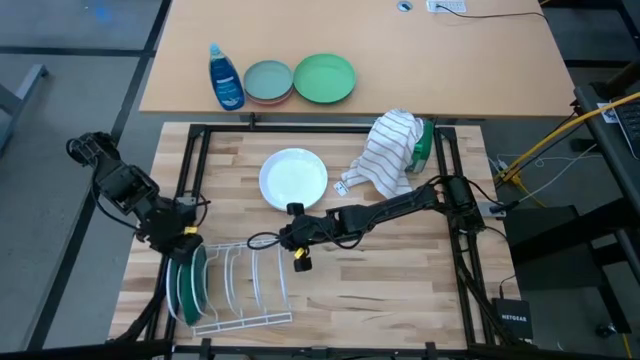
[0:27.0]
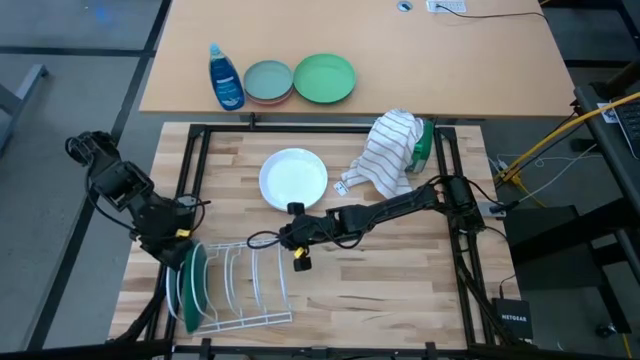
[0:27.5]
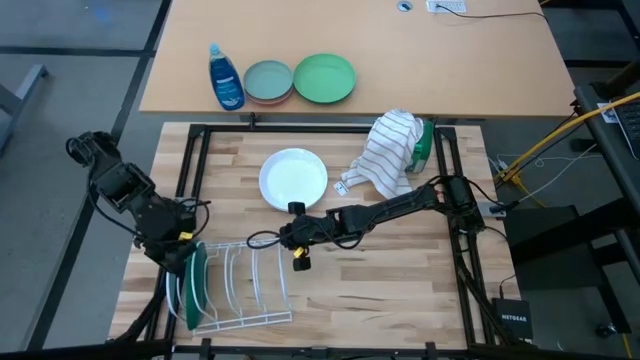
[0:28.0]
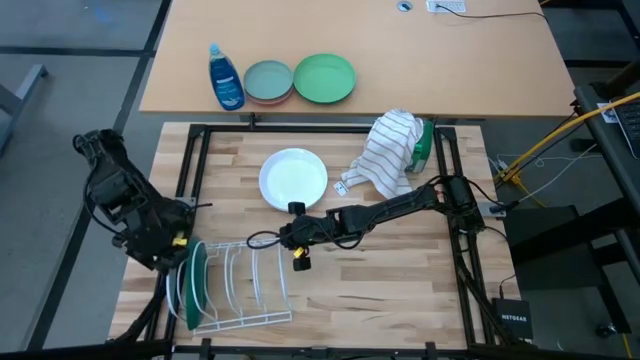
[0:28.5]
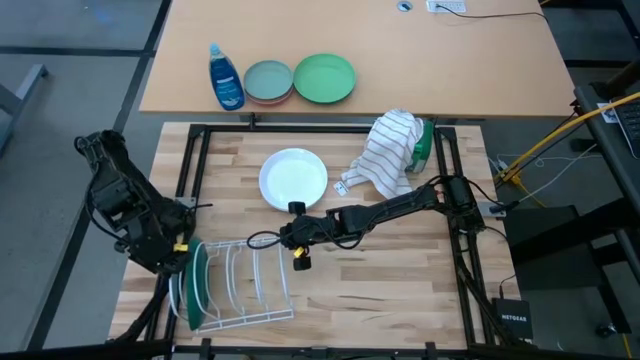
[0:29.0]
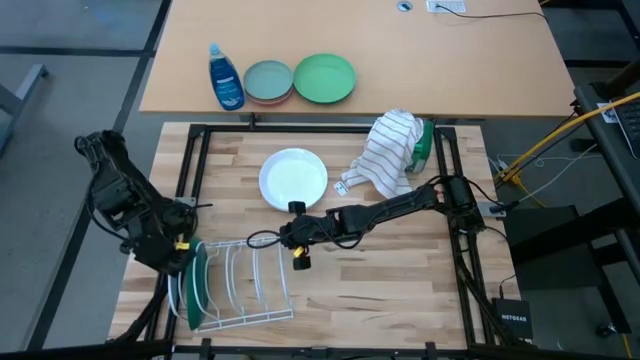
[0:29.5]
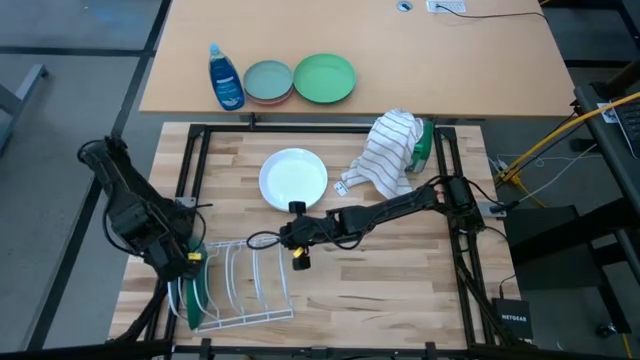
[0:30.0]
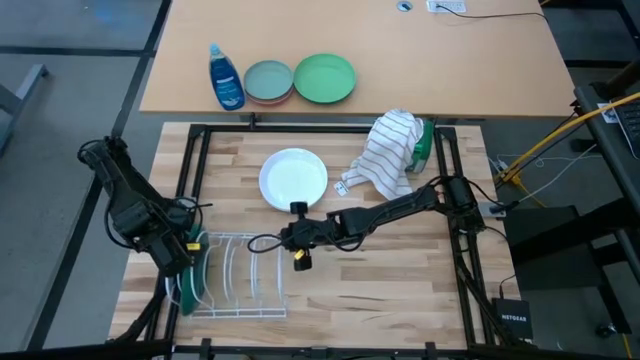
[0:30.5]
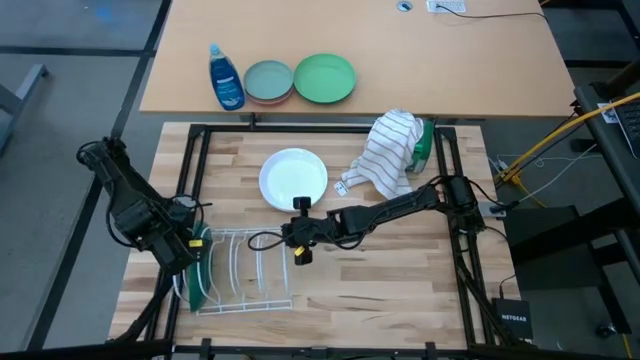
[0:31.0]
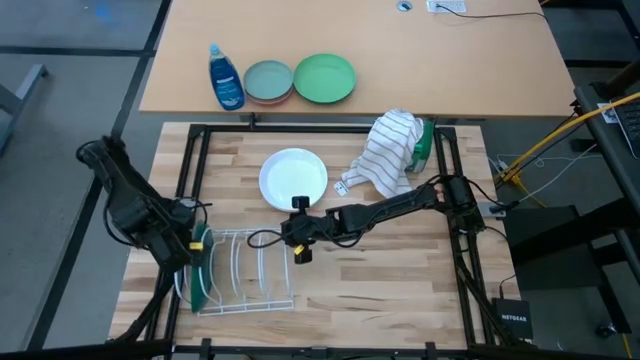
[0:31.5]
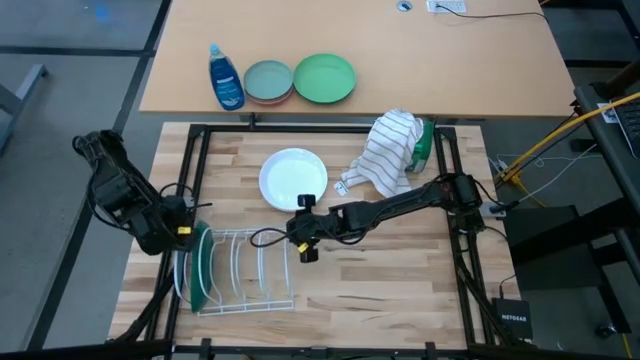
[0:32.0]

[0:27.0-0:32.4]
Task: Sort dishes
Adjust the white dish rack

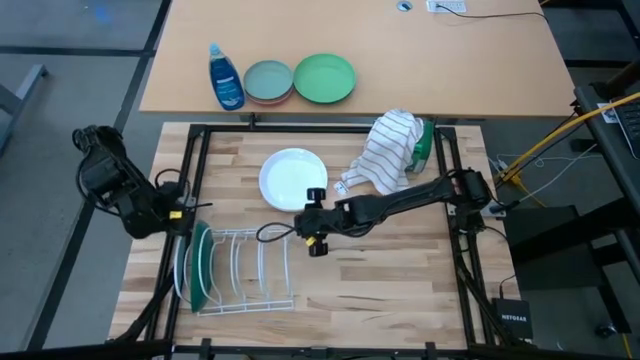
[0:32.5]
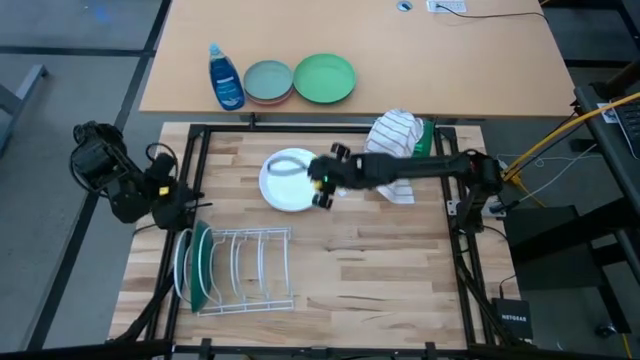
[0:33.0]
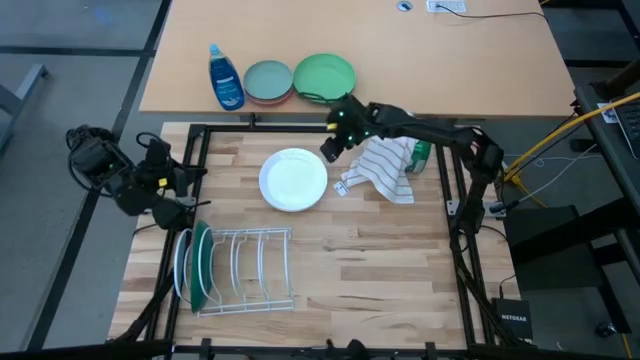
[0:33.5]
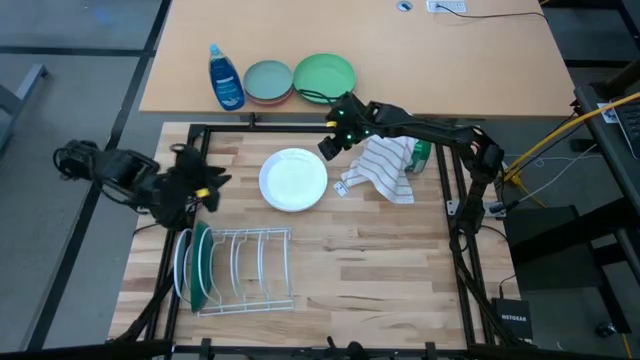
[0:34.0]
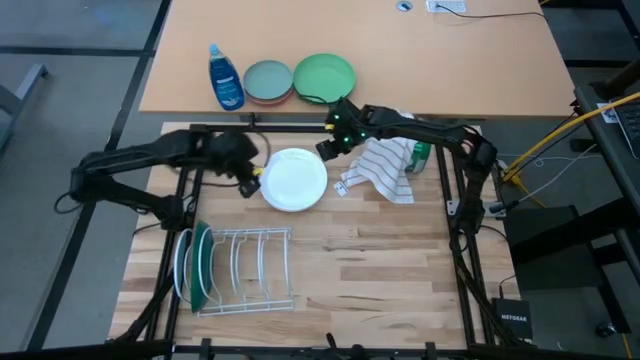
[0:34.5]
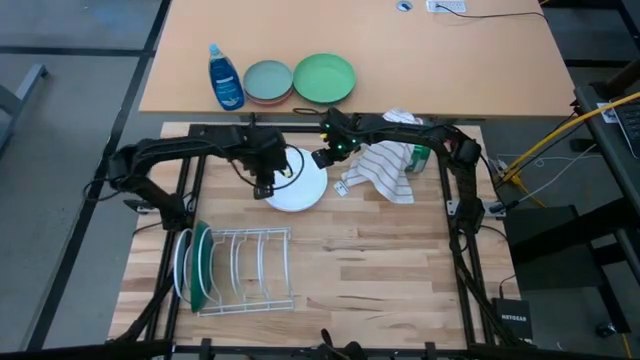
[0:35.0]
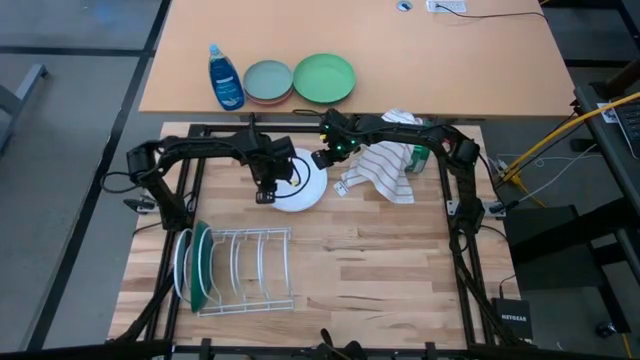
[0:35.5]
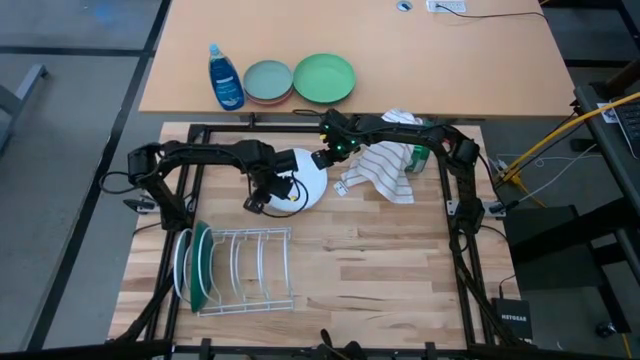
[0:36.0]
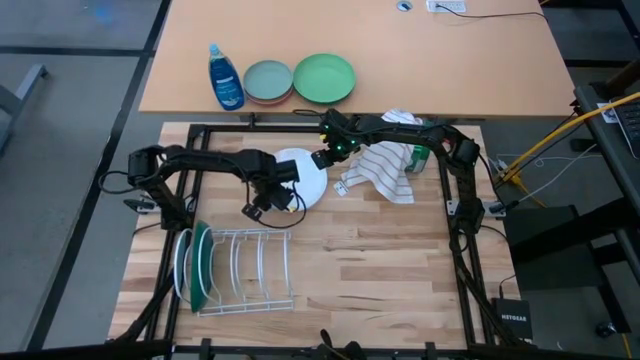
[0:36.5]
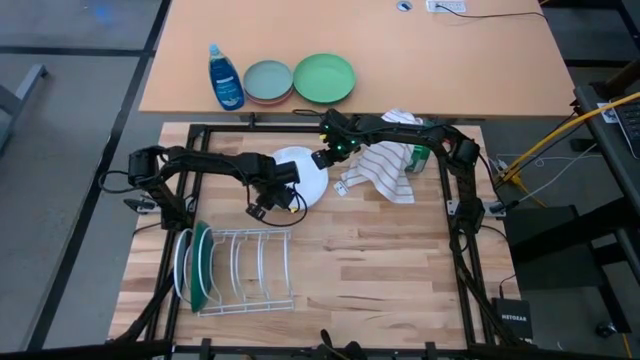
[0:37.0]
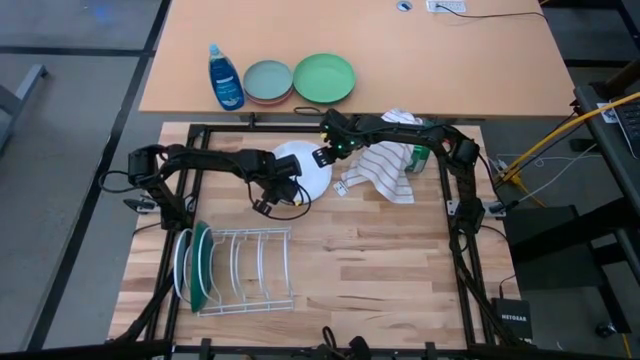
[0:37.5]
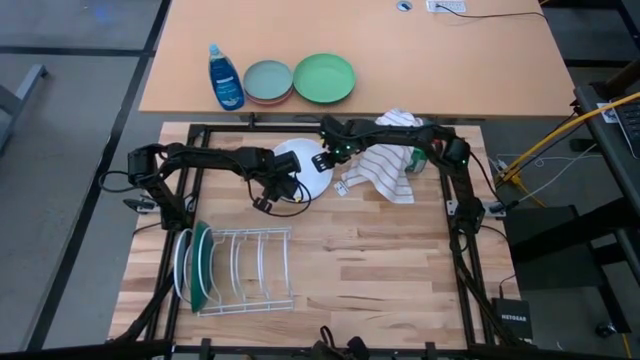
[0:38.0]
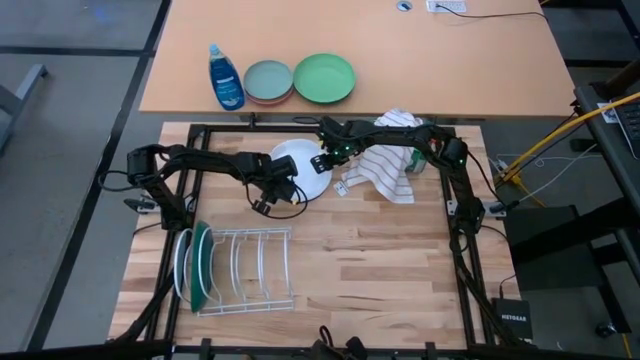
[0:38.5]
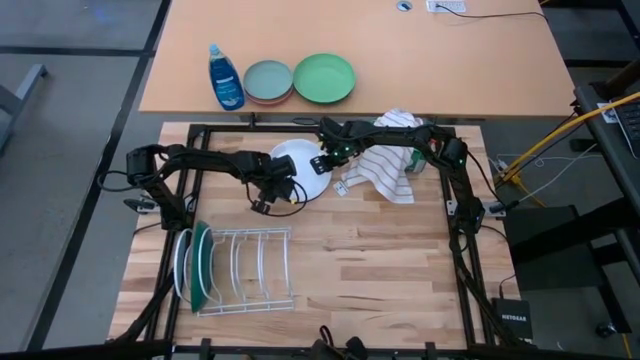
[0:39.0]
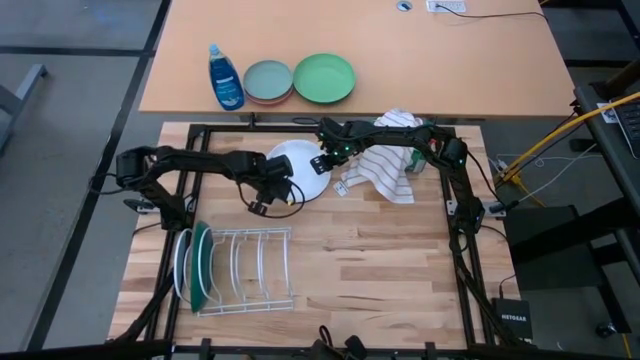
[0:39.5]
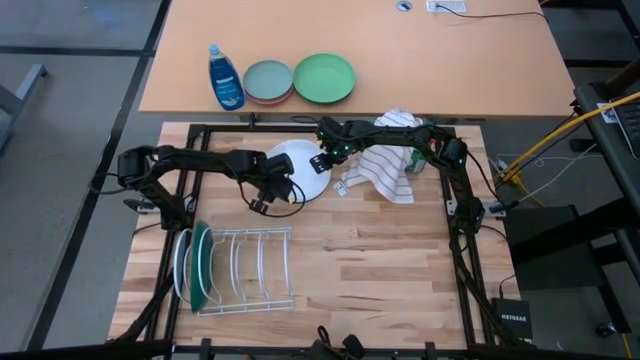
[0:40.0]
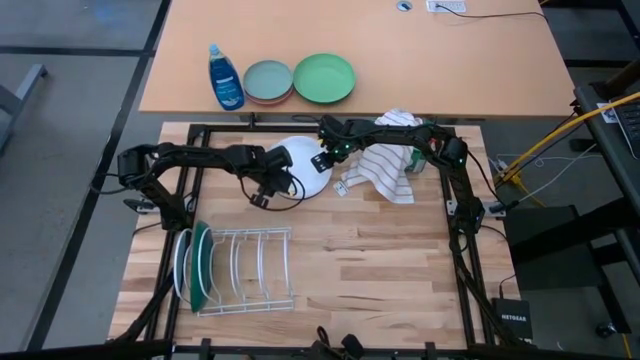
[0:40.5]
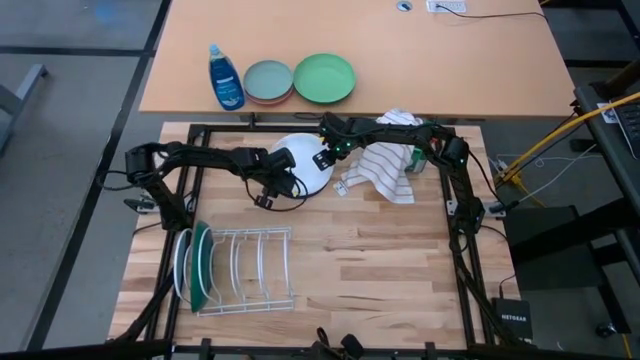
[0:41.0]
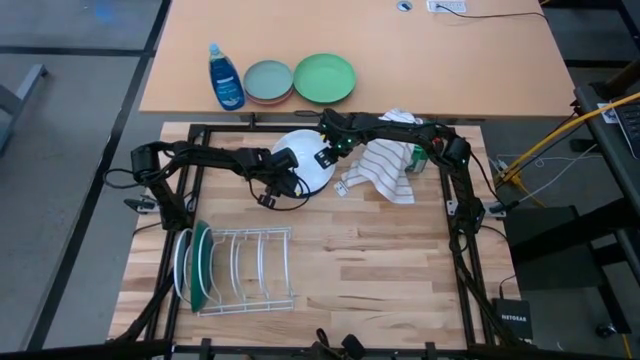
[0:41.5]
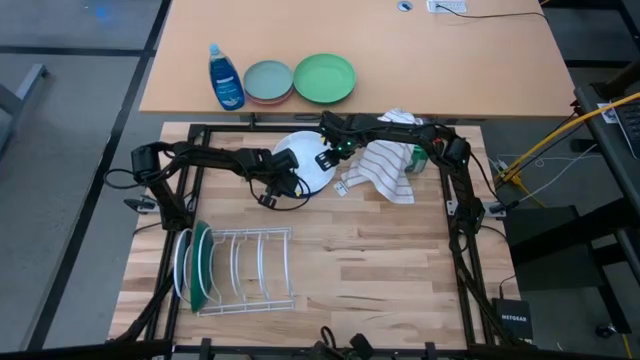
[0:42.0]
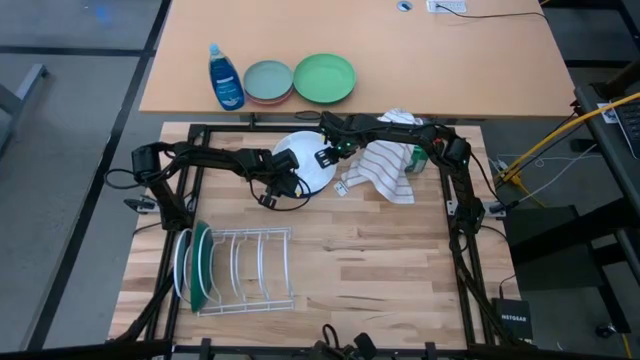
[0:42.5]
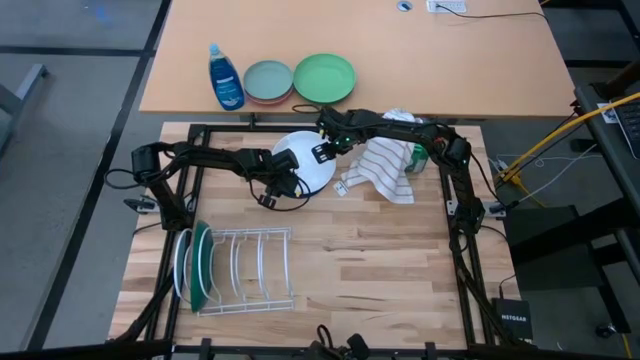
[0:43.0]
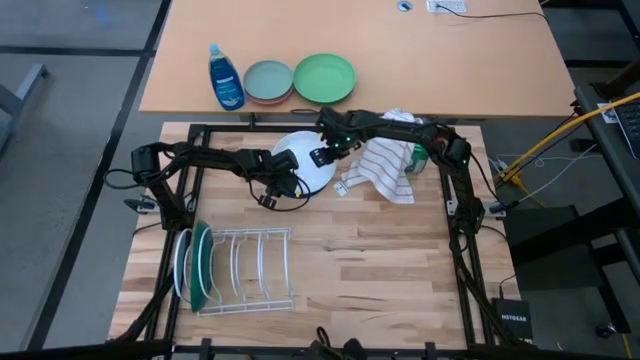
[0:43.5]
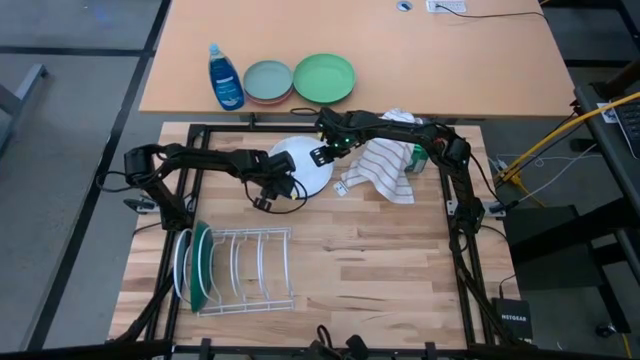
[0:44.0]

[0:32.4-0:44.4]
Put the white plate in the white dish rack

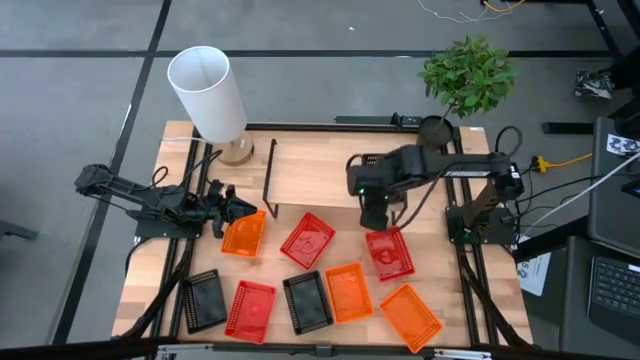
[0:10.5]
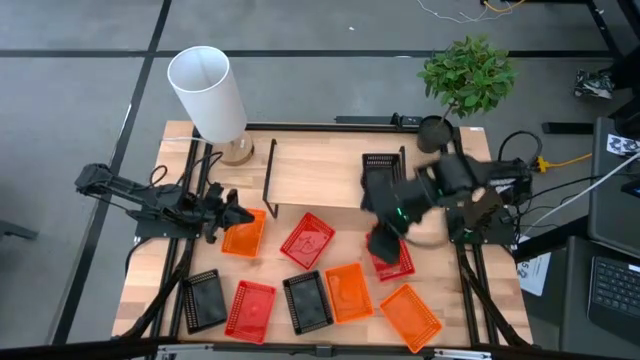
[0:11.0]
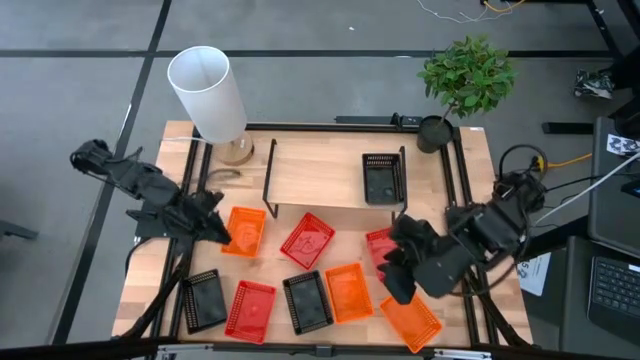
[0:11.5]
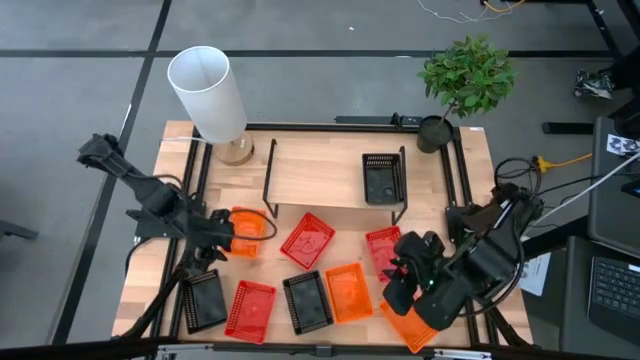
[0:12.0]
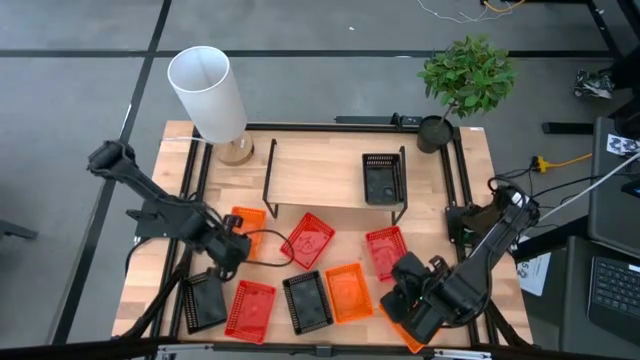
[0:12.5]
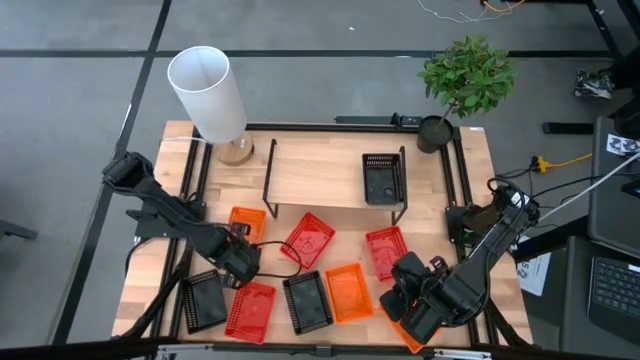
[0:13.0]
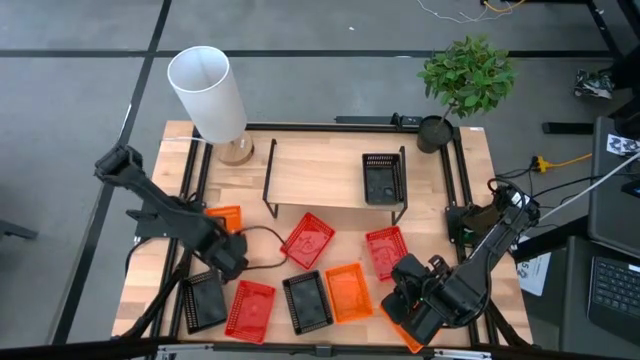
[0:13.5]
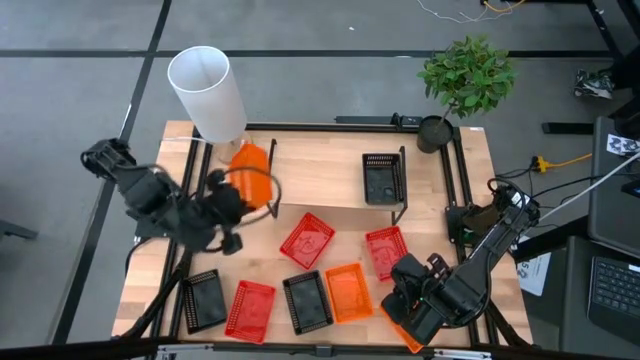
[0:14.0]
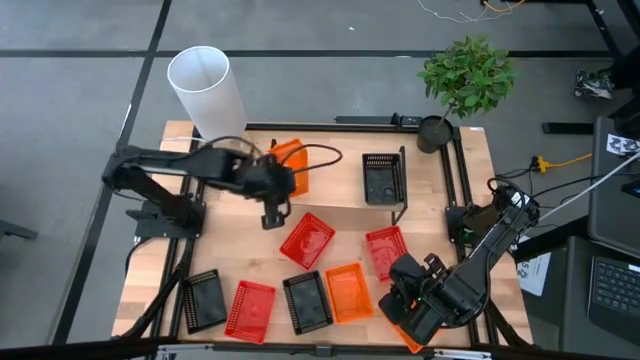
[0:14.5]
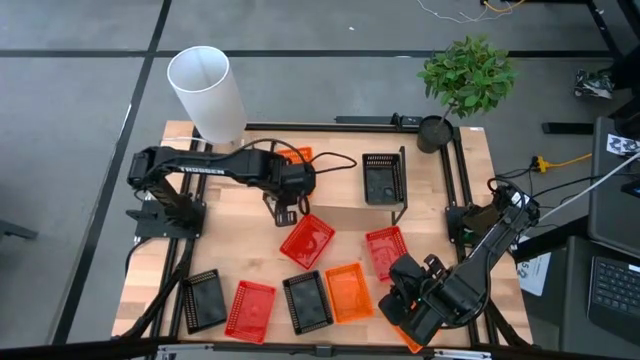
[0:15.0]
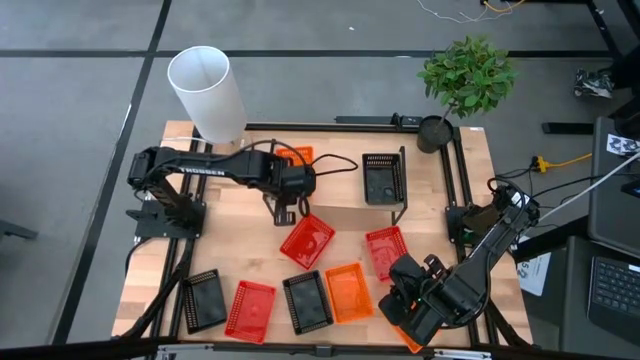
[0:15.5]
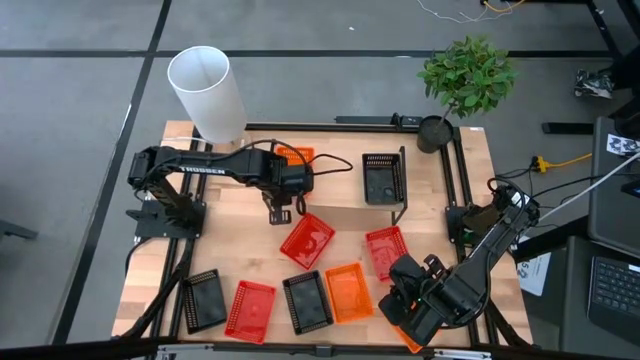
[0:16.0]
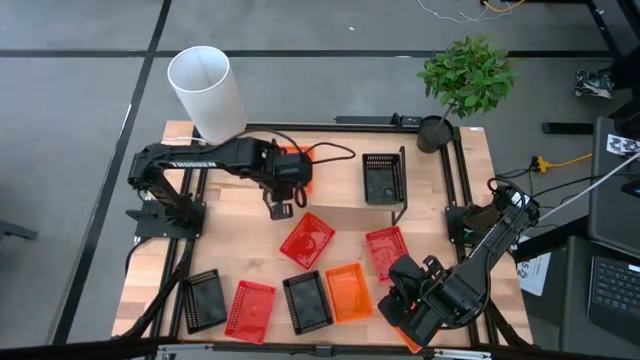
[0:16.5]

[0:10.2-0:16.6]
Task: Stack baskets on shelf by color
Put the middle left orange bin on the shelf
